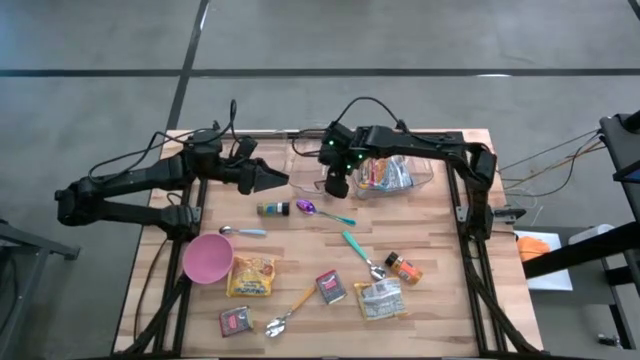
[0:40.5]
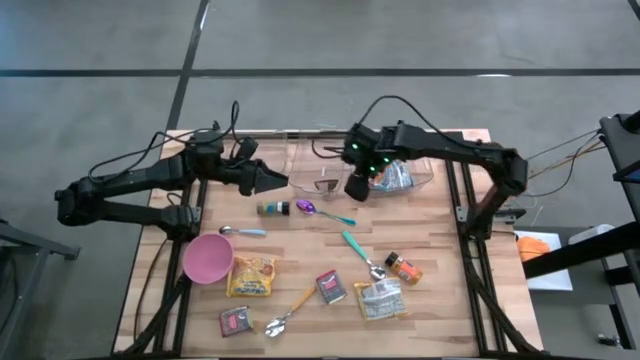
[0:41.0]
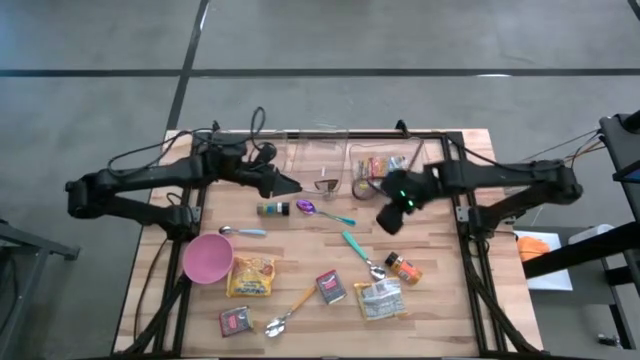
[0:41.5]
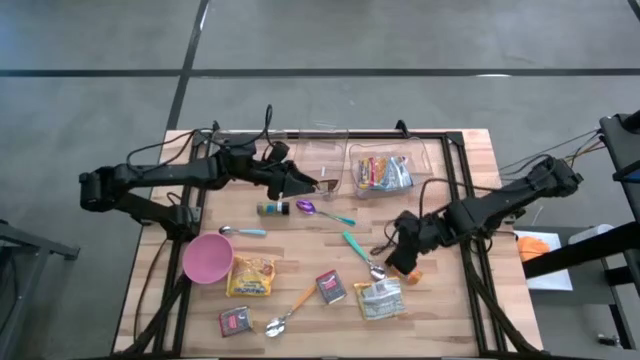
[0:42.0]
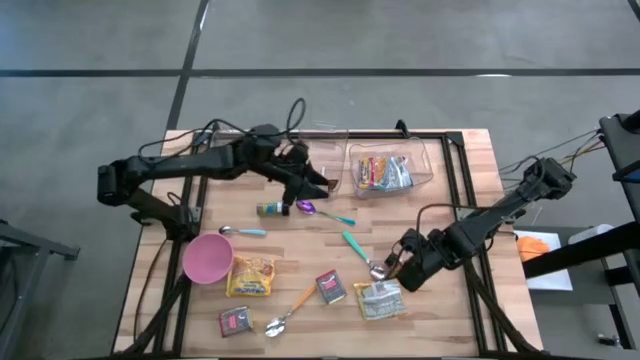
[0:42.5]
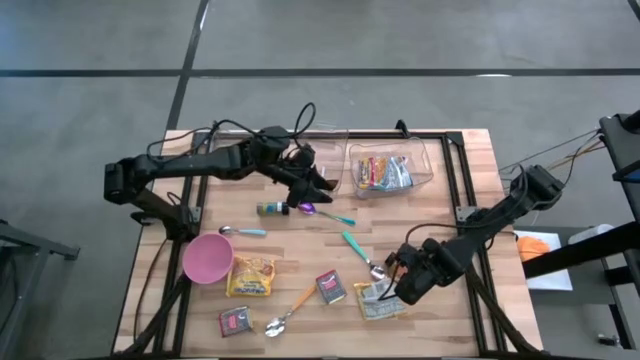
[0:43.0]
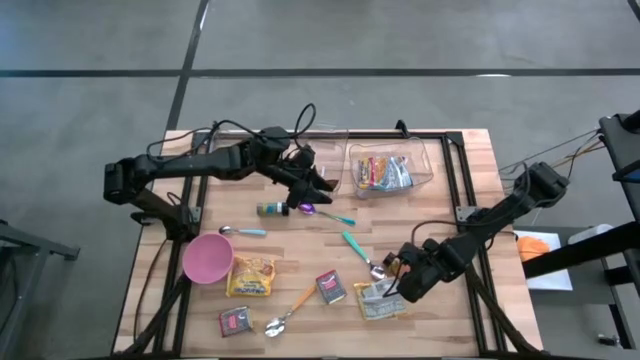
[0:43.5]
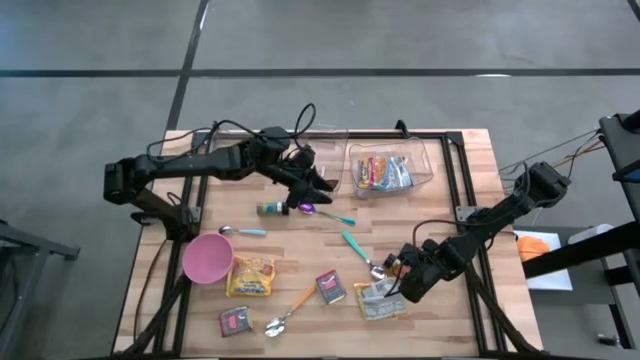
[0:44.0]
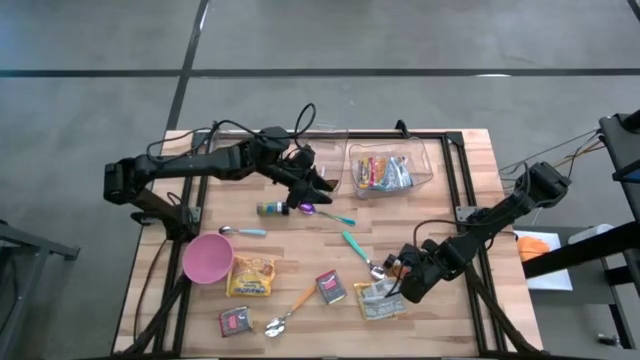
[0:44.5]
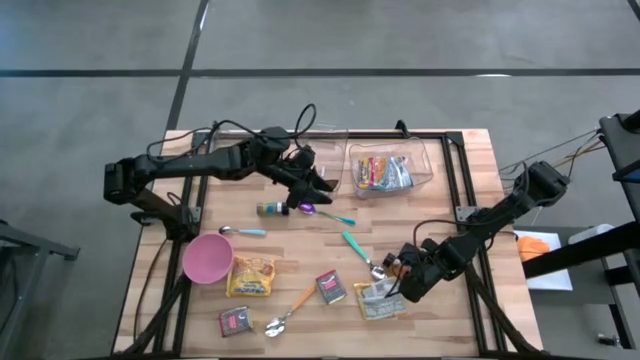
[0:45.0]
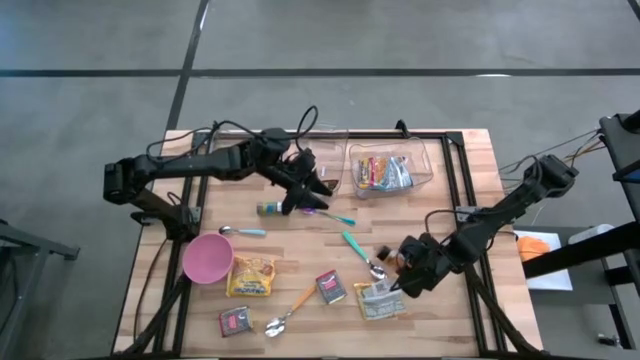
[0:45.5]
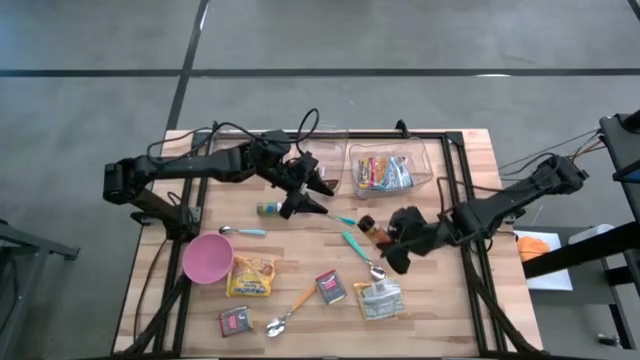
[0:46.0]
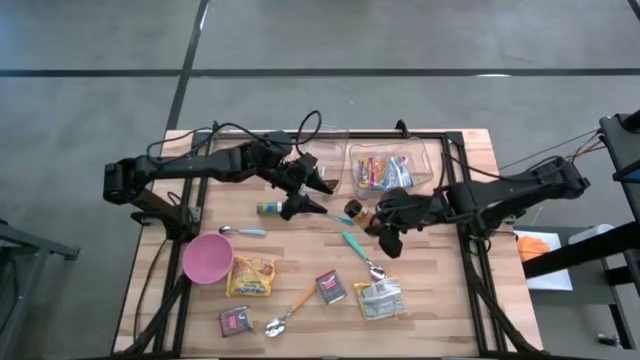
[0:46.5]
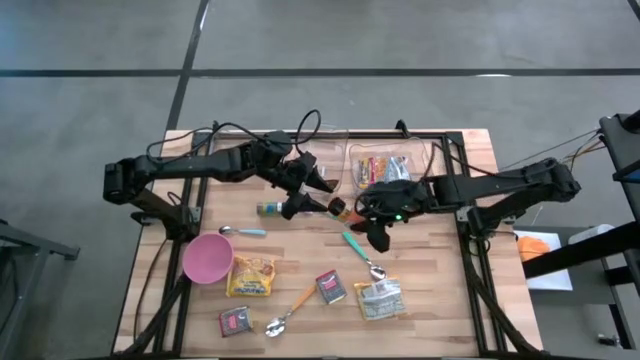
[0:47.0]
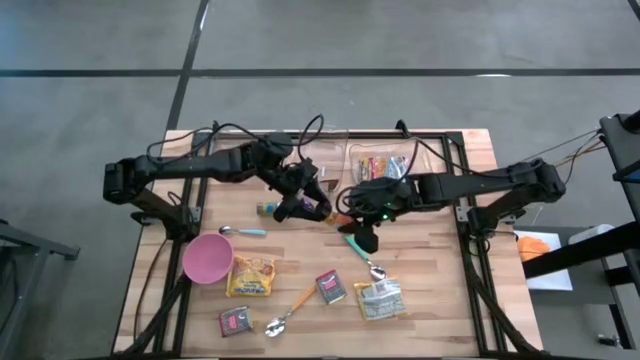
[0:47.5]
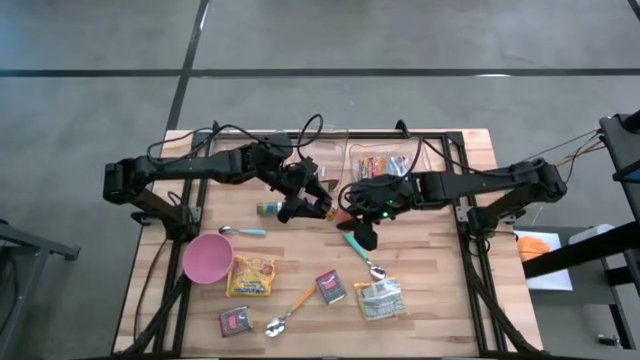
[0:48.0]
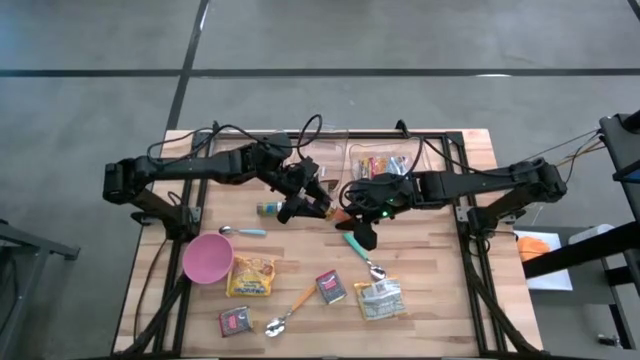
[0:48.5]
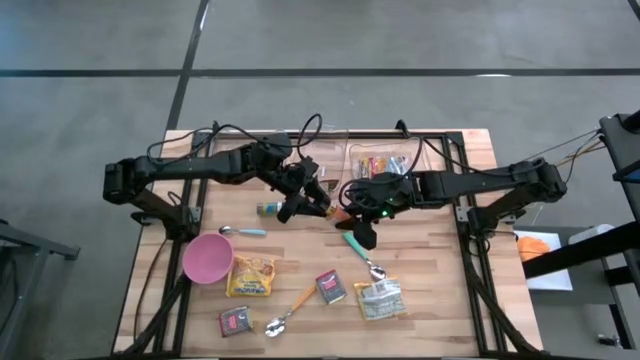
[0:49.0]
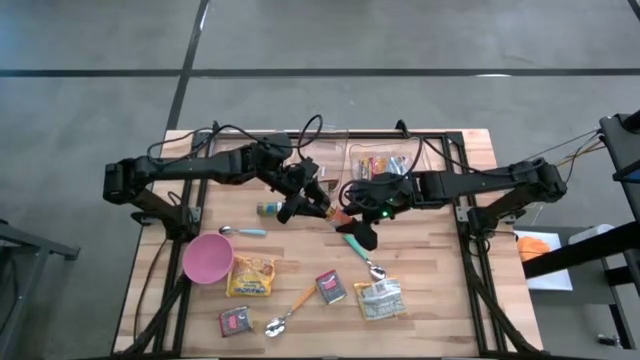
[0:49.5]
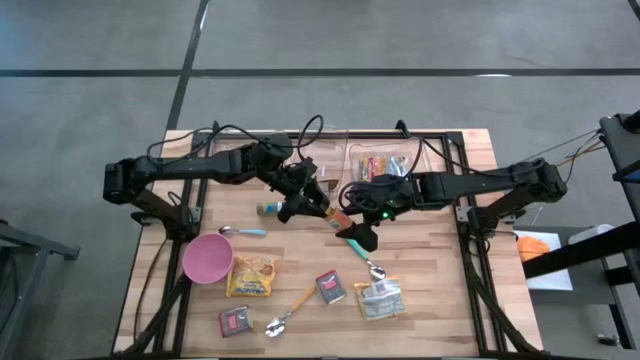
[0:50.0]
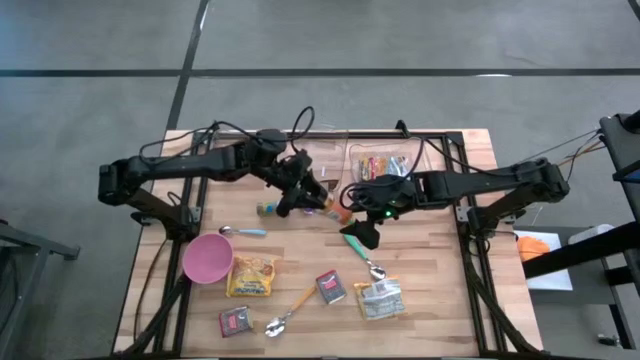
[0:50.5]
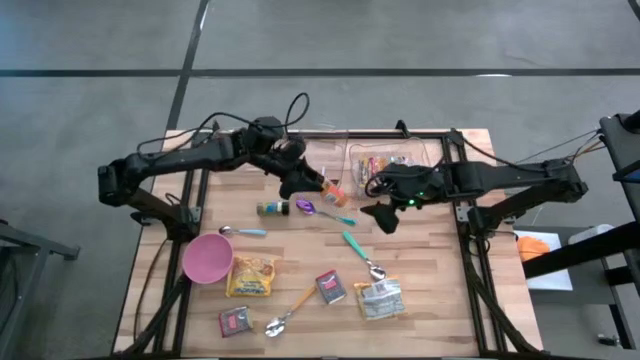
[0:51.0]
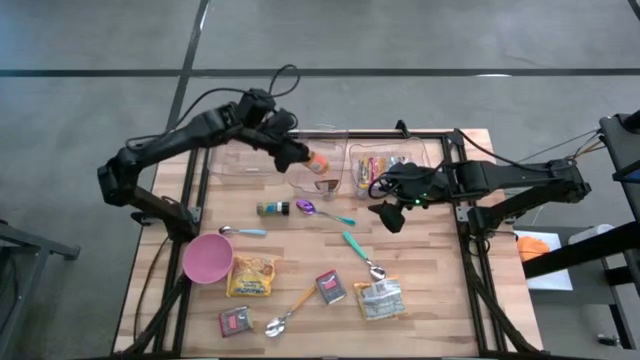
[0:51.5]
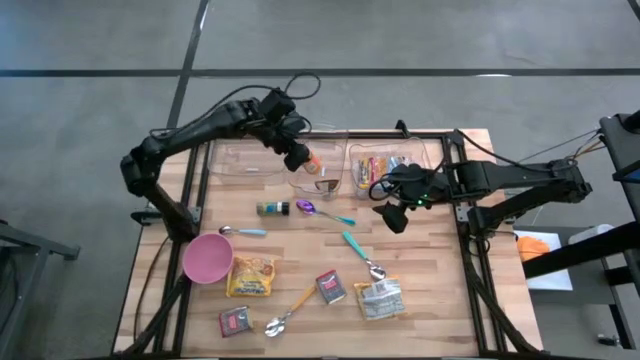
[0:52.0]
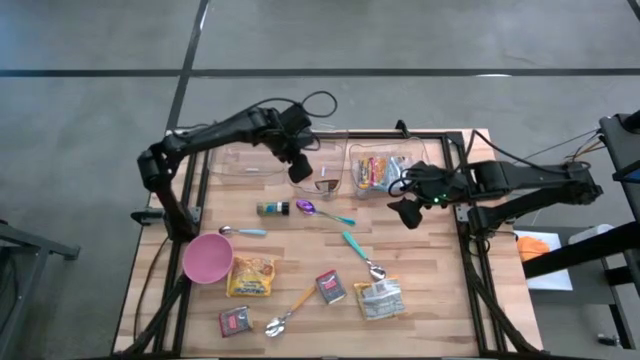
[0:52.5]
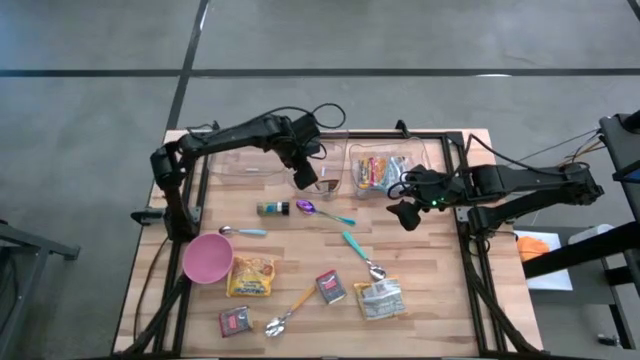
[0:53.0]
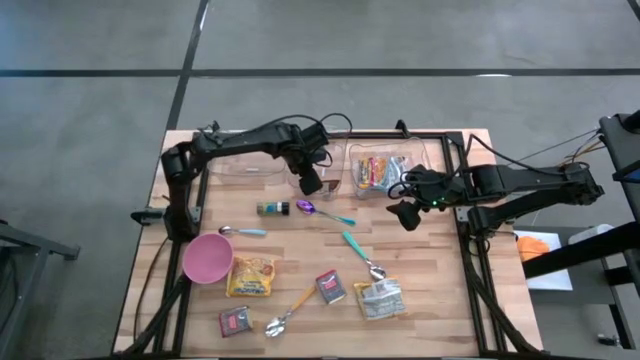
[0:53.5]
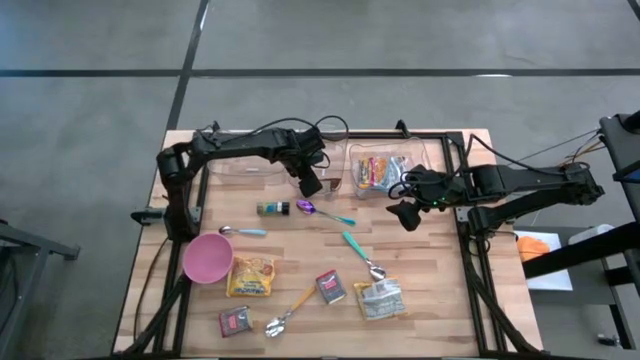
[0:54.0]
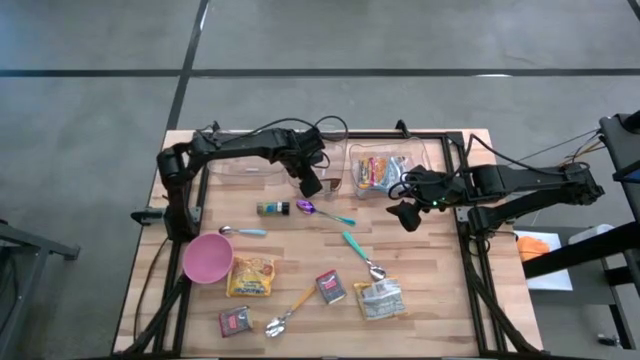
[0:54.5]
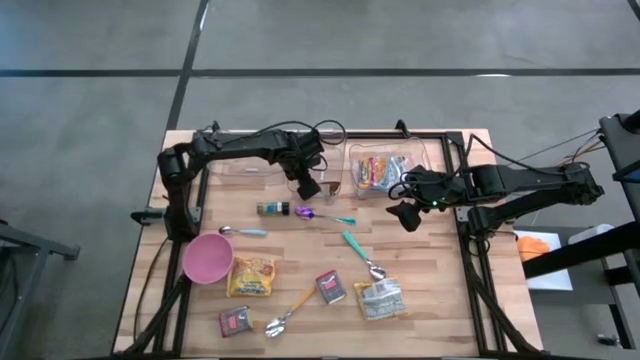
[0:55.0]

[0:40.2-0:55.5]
Put the orange seasoning bottle into the middle transparent bin

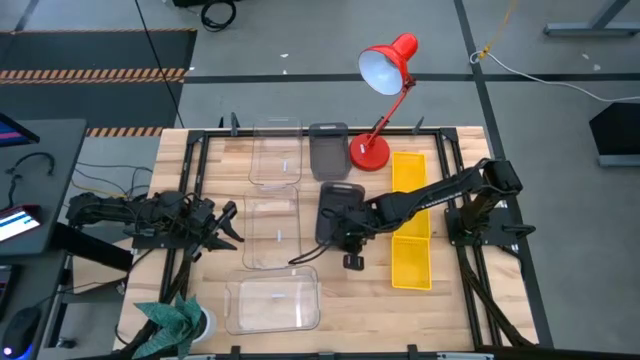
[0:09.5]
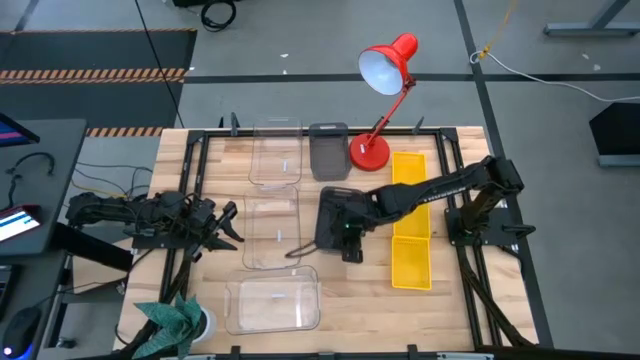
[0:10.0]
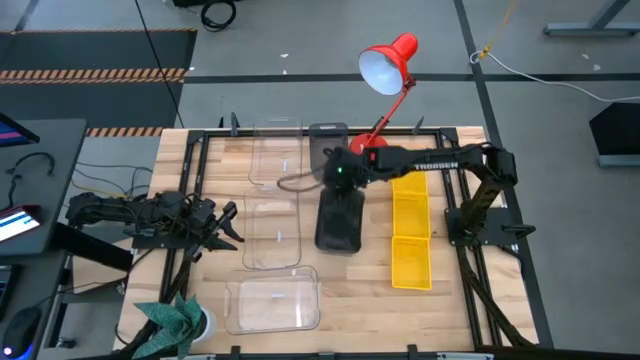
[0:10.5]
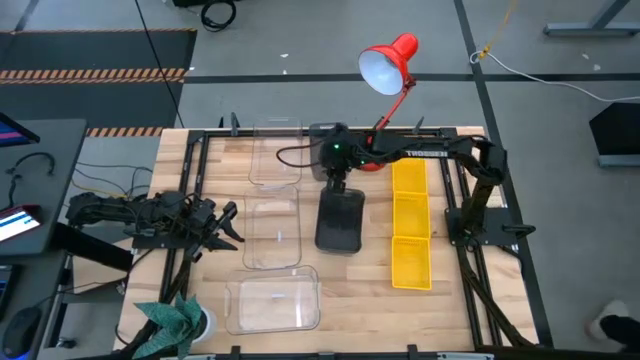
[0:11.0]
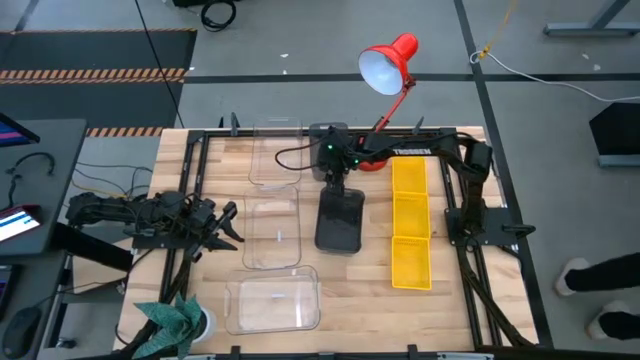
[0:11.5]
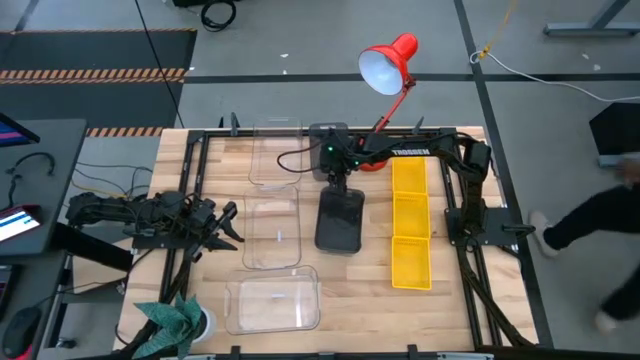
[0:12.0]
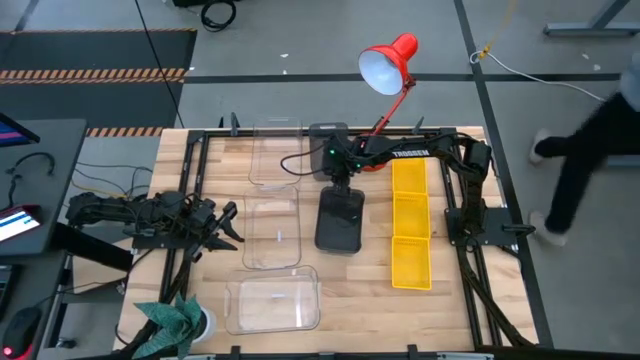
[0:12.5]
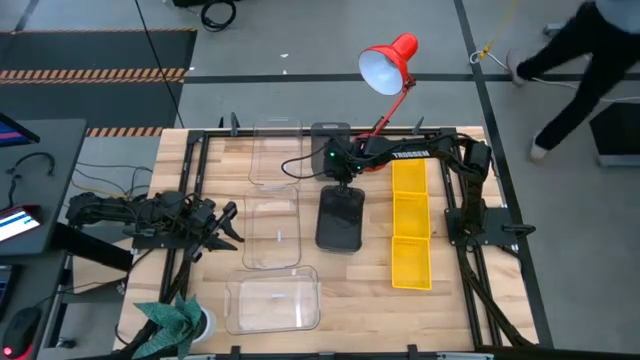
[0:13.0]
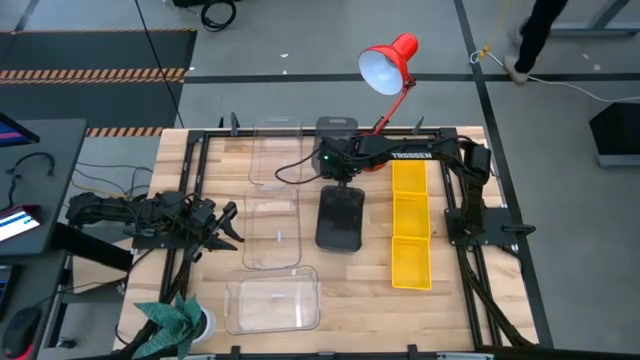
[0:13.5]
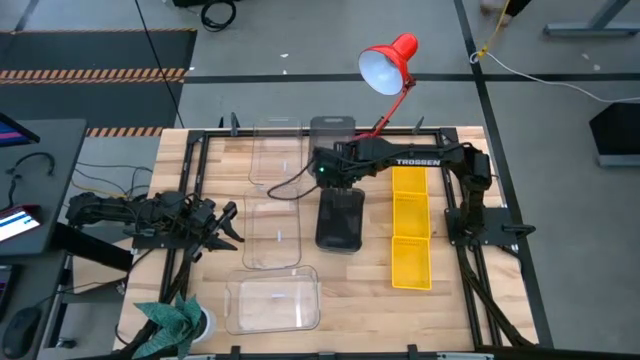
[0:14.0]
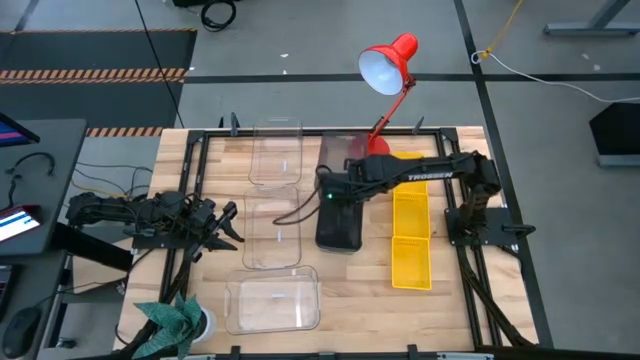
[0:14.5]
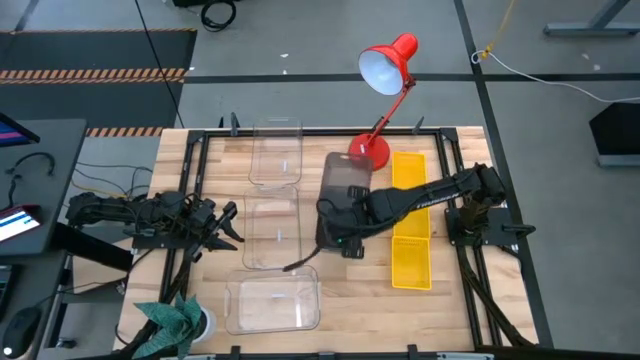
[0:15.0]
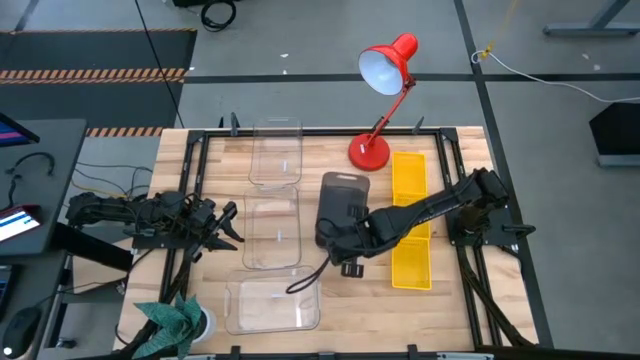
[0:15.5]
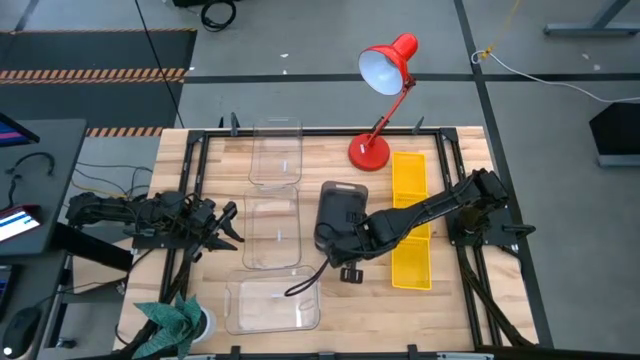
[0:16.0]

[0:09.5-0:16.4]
Stack the top black bin on the bottom black bins
